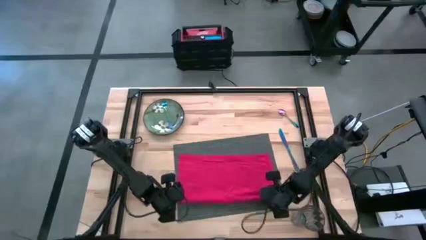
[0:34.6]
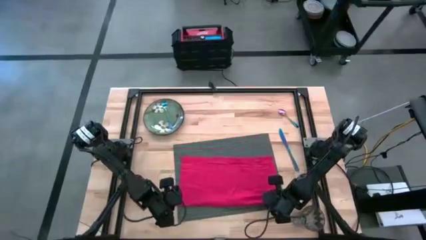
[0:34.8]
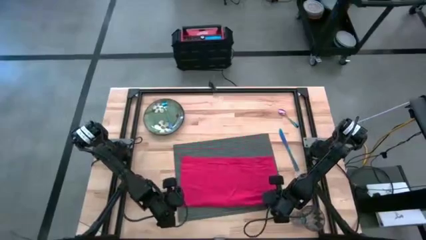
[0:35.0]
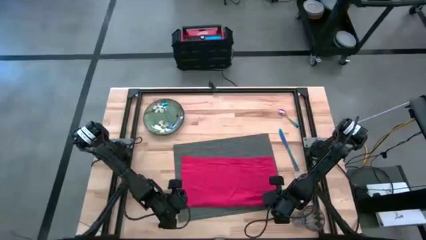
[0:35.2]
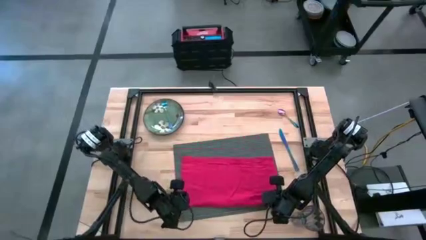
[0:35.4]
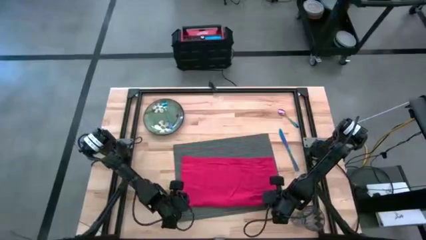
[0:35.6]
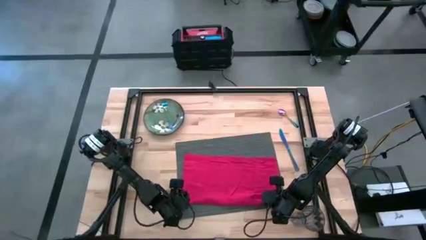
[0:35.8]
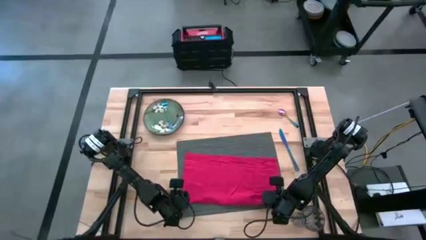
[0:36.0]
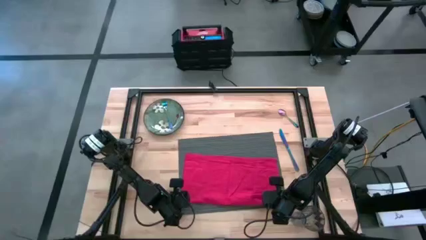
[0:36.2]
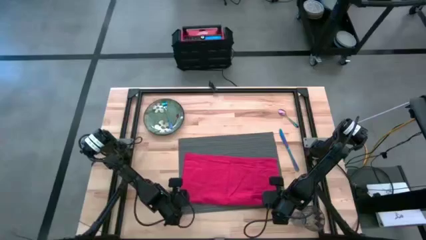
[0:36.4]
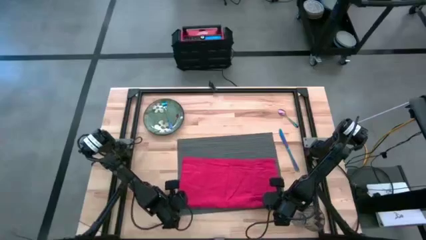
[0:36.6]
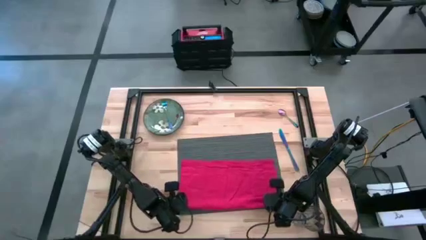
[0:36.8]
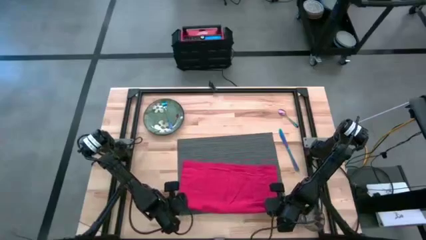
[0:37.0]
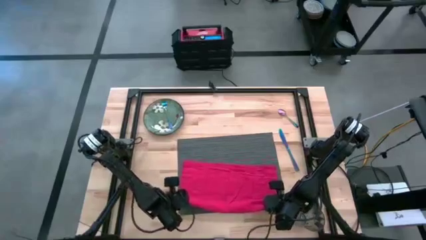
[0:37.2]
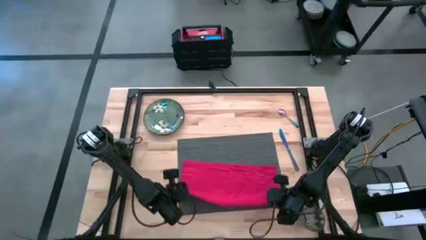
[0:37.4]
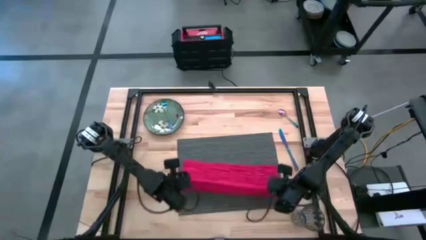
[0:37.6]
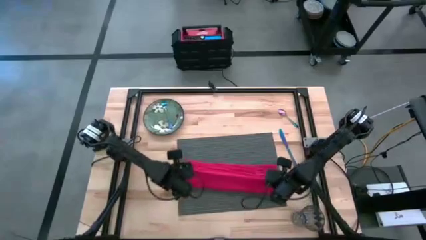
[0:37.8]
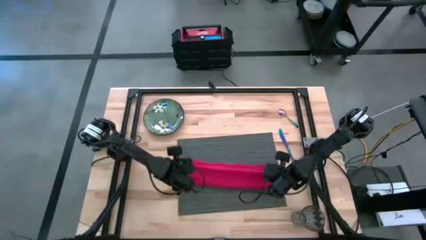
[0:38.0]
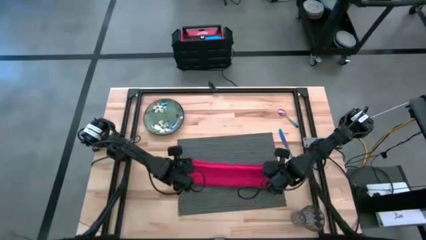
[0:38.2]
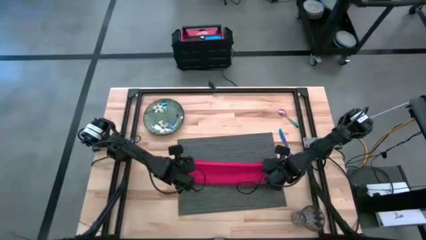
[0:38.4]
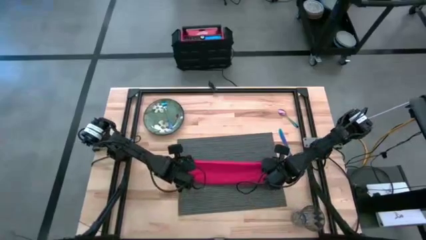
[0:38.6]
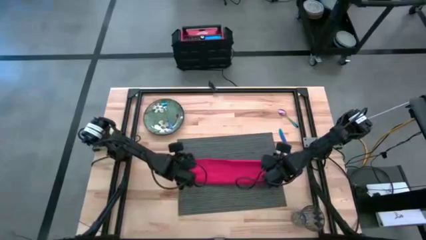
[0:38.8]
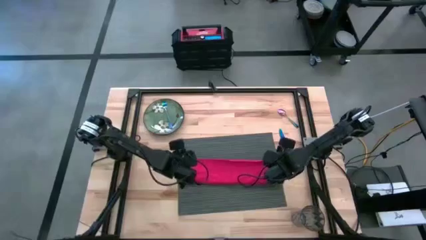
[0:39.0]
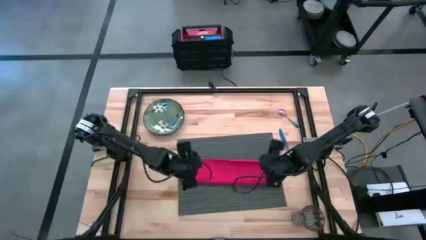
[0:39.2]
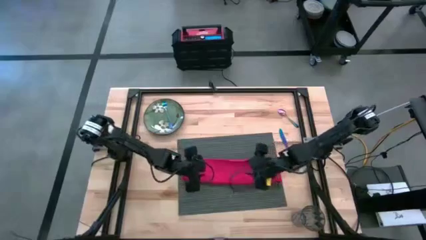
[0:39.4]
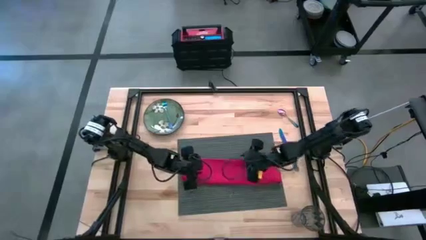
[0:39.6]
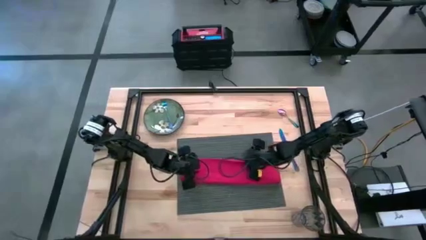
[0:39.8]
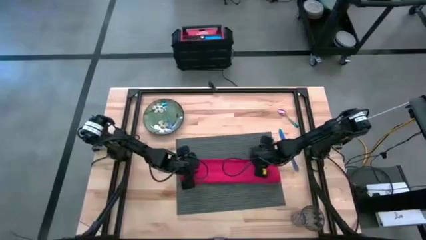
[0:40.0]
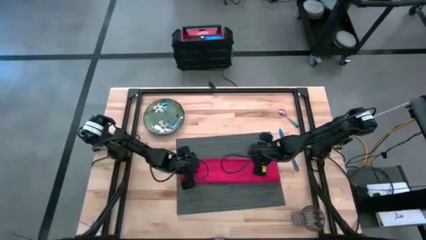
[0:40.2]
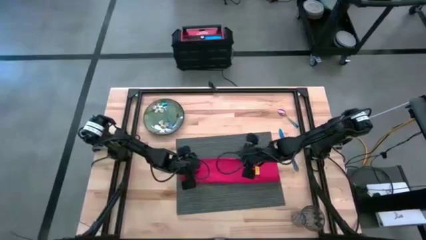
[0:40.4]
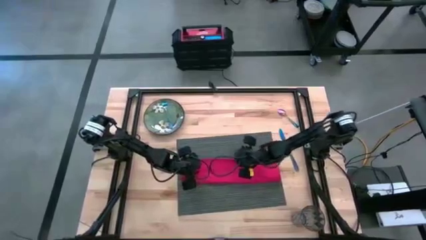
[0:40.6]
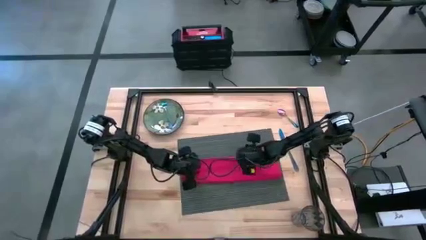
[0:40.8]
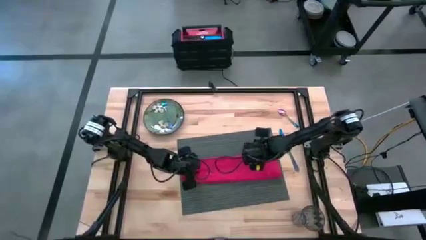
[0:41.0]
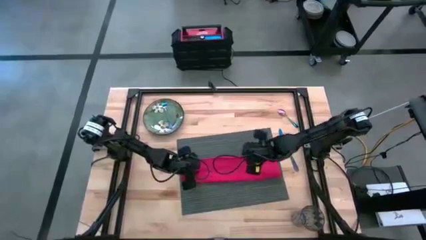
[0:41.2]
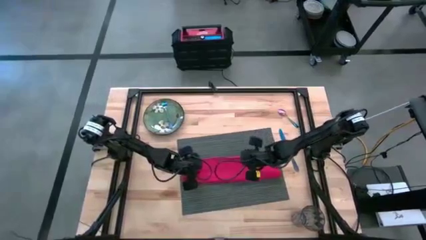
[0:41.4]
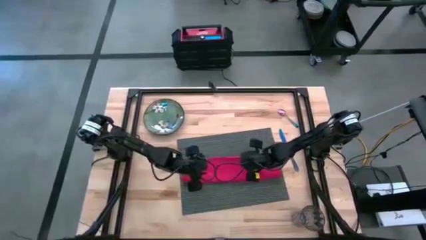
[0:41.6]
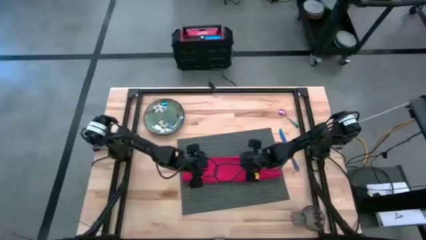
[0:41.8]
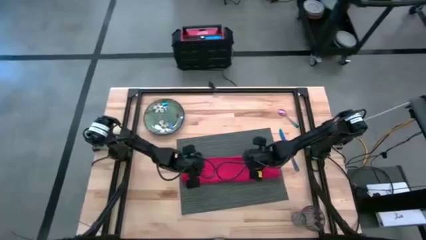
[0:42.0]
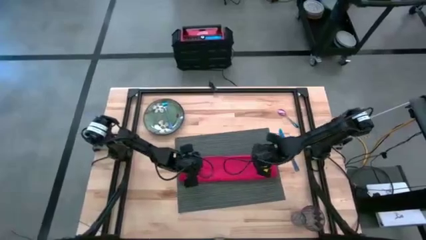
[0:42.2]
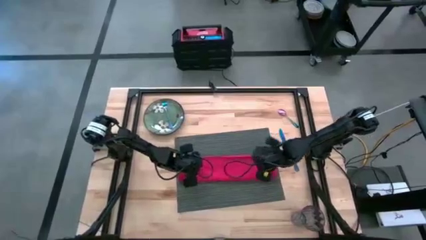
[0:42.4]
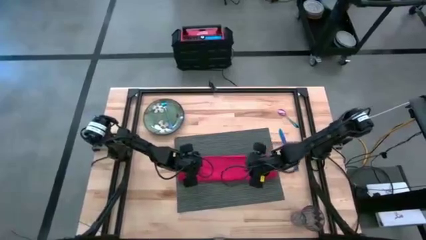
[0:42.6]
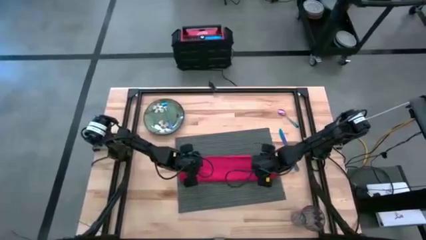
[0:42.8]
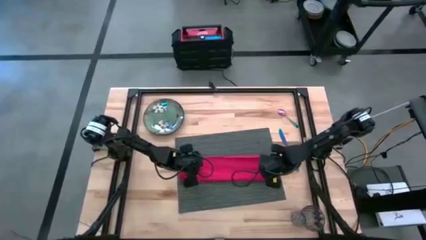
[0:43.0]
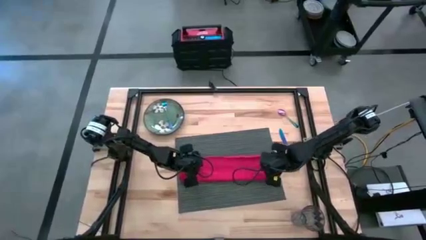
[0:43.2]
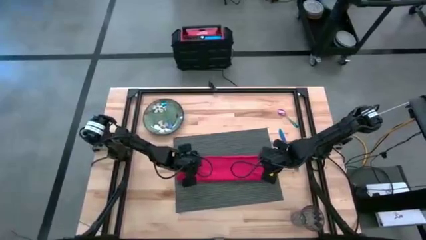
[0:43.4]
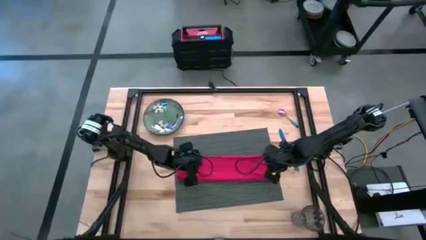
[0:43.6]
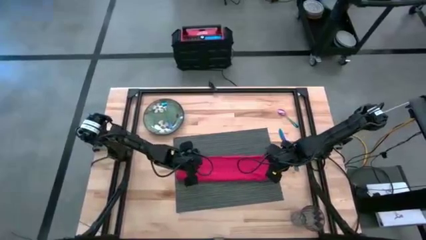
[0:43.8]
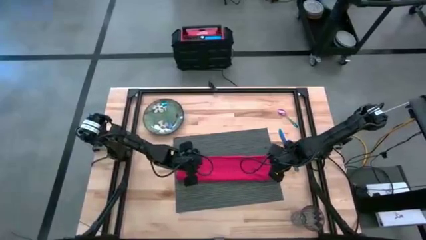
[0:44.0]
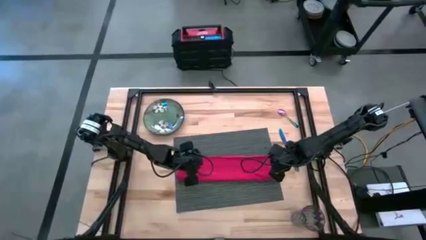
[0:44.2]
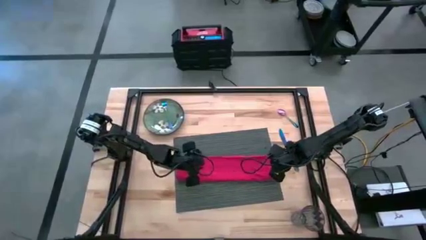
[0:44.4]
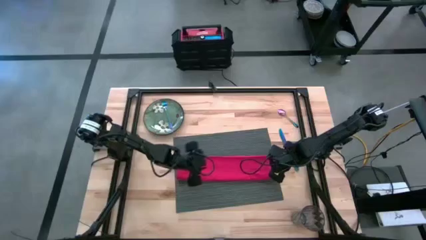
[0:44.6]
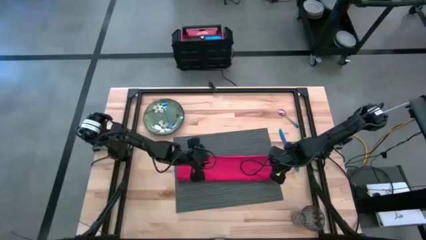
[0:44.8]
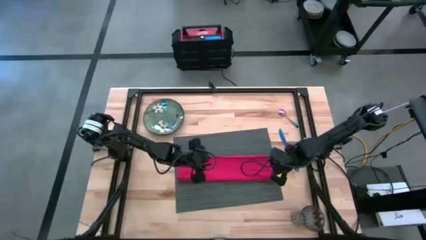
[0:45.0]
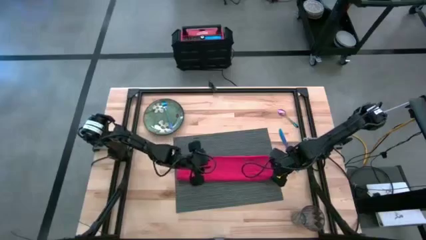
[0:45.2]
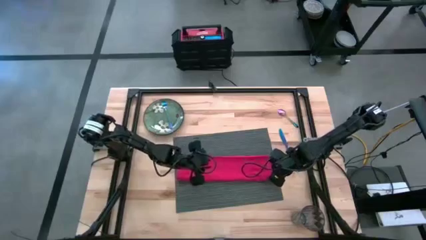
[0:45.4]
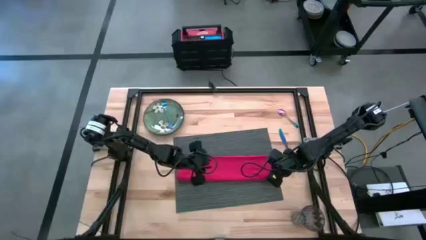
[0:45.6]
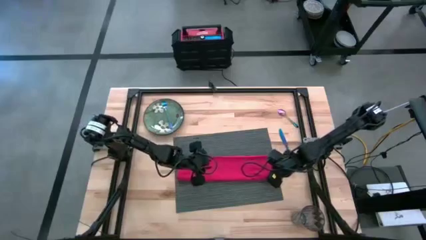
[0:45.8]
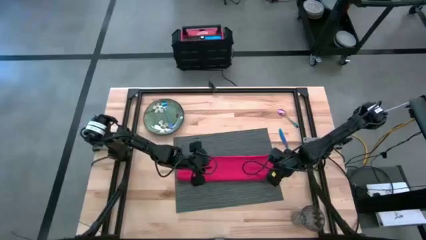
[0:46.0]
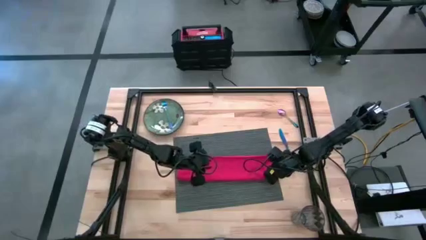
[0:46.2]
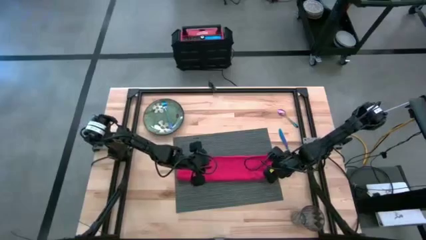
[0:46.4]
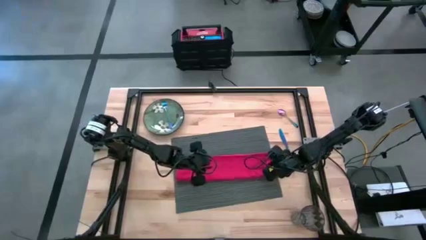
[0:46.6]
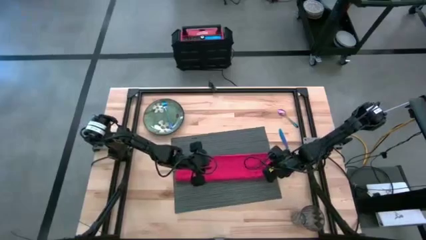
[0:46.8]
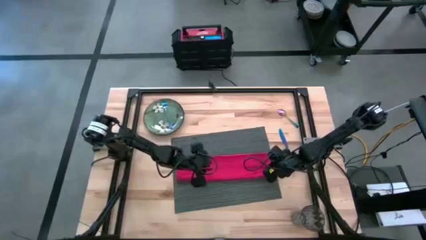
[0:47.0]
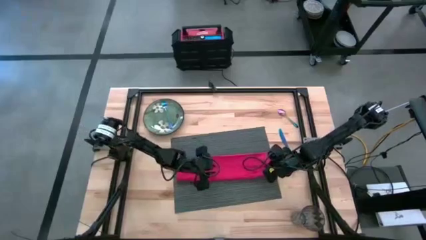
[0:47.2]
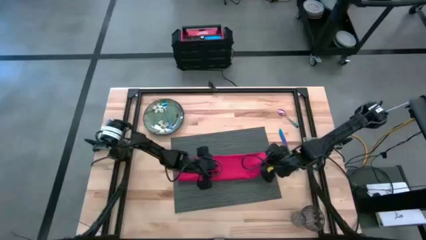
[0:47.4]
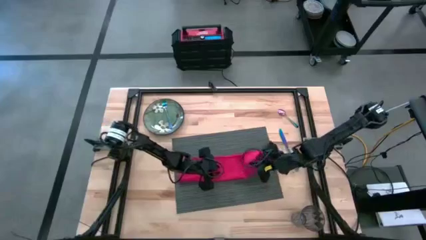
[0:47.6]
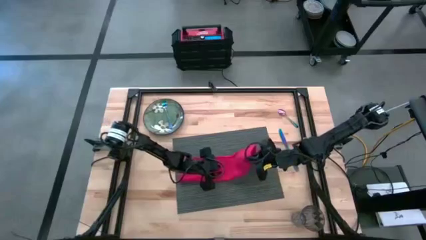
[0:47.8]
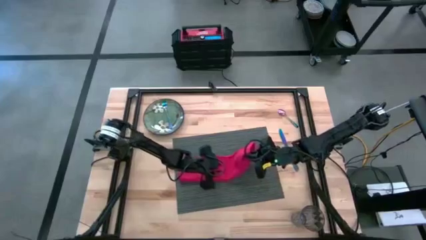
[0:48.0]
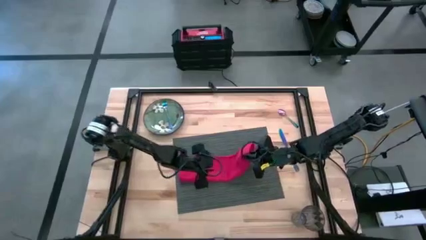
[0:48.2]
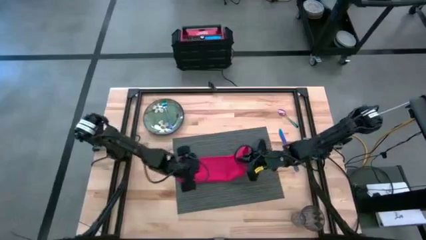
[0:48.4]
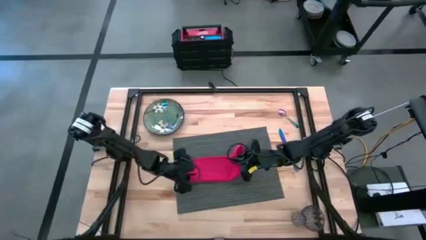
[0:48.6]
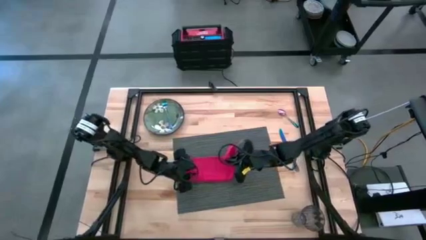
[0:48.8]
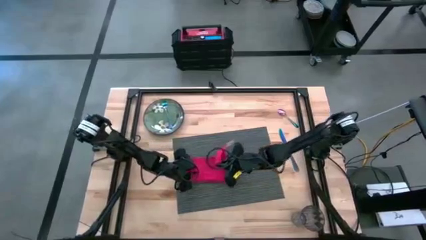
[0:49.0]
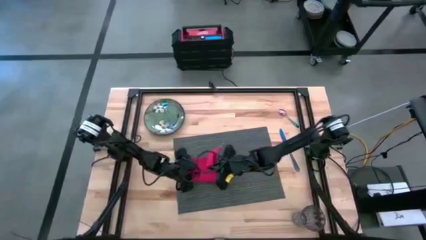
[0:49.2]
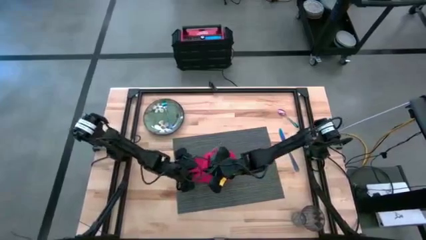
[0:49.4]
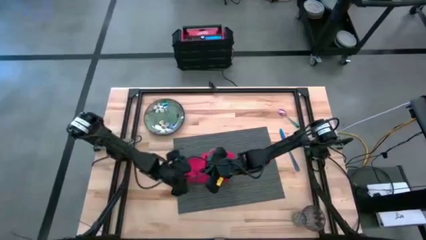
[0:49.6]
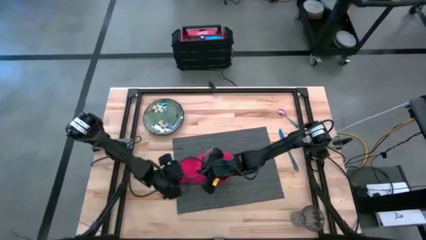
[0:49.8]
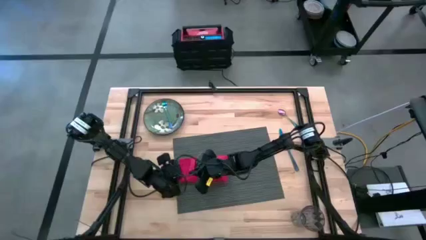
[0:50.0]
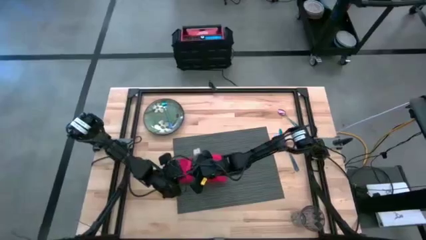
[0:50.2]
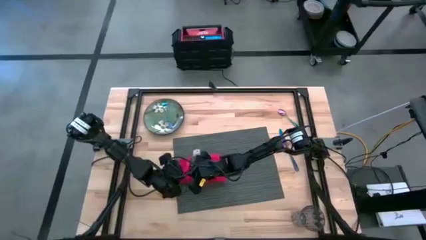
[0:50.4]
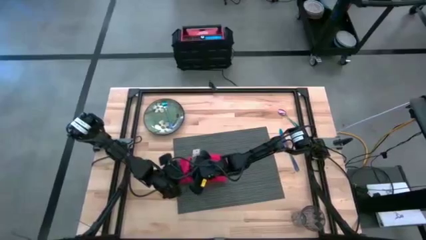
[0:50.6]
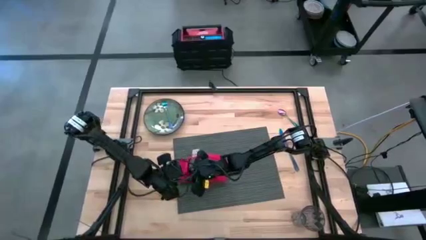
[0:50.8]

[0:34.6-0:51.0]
Task: Set table place
Fold the red table napkin
